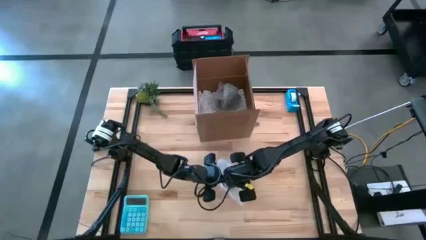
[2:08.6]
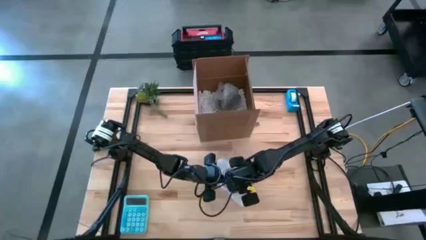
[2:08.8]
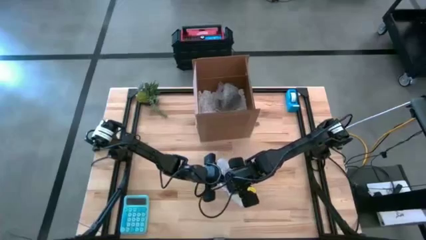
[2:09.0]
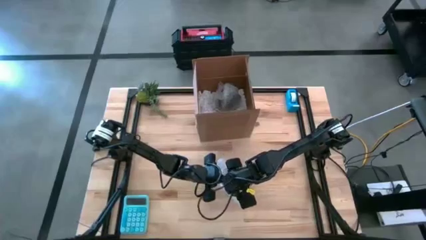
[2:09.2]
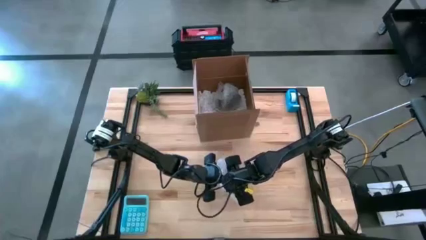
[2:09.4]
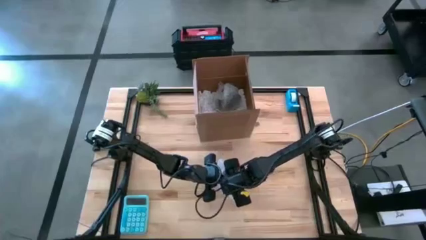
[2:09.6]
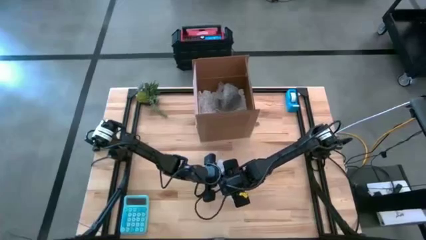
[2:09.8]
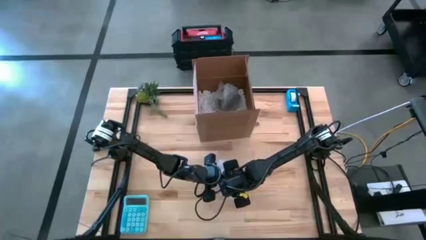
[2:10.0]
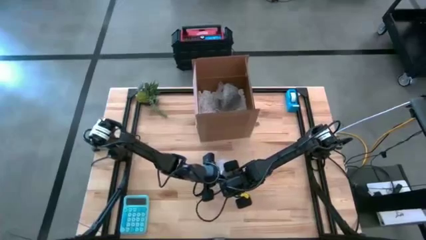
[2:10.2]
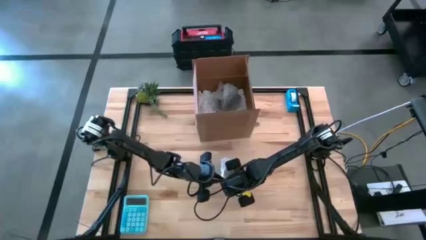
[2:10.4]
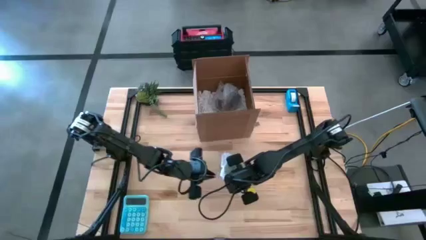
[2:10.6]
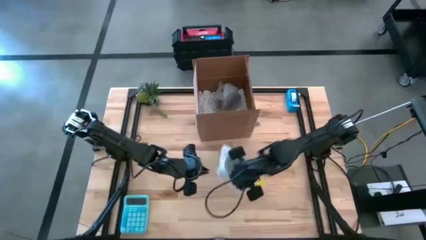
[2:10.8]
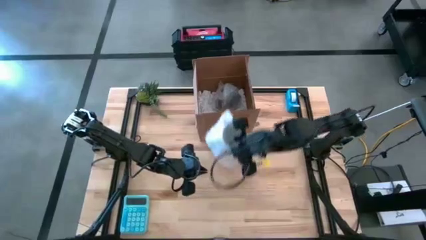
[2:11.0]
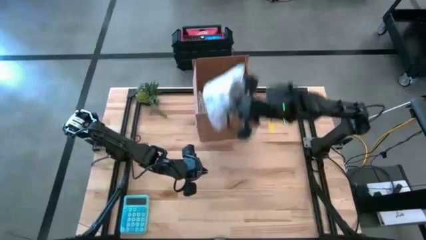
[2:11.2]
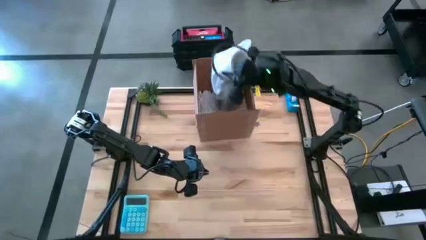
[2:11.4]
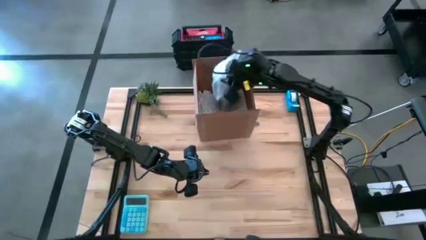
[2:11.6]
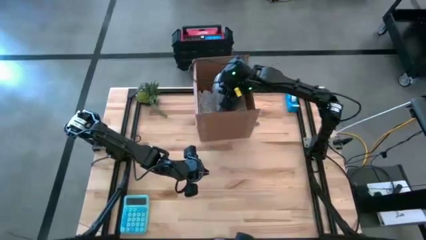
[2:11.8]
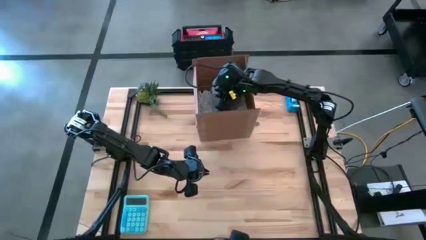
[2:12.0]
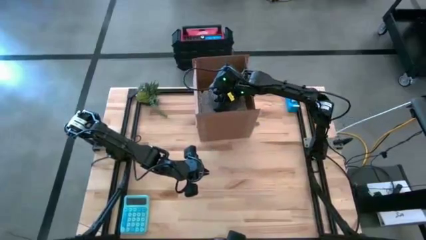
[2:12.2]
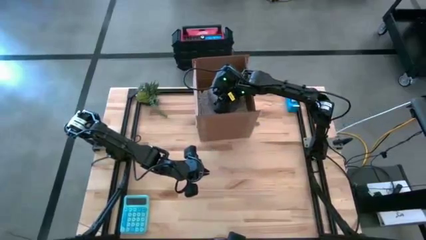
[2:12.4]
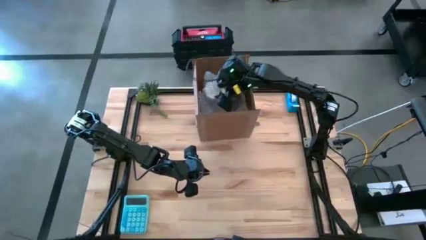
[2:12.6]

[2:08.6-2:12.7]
Task: wrap mug
Put the wrapped white mug into the cardboard box

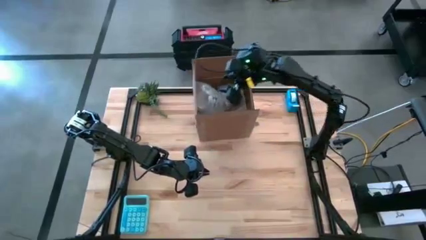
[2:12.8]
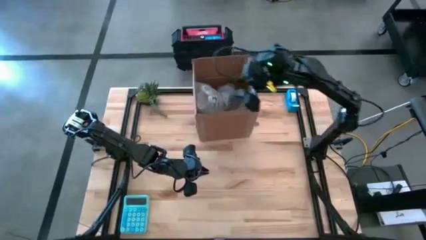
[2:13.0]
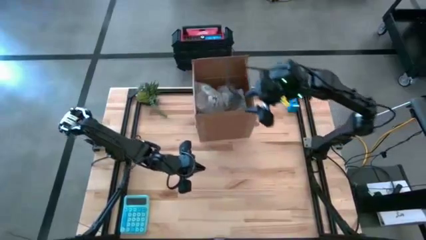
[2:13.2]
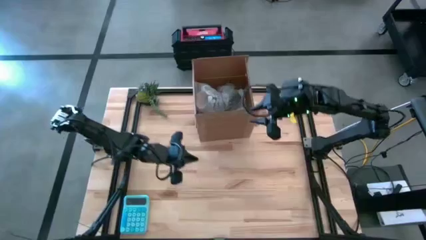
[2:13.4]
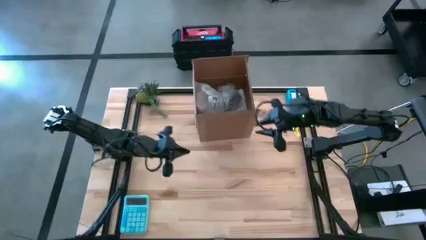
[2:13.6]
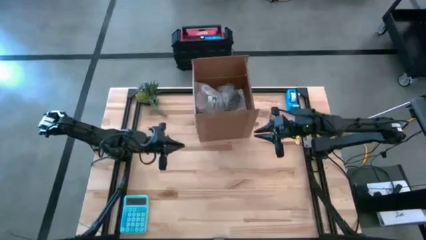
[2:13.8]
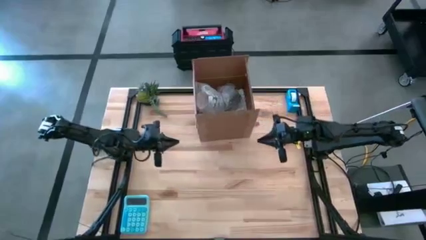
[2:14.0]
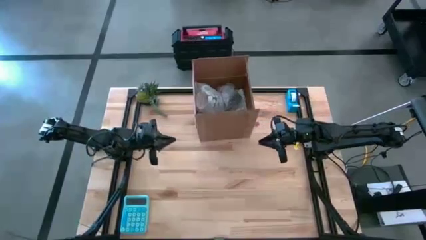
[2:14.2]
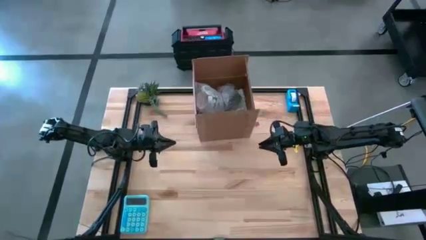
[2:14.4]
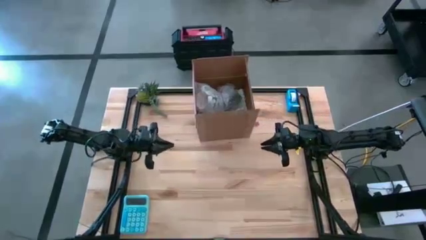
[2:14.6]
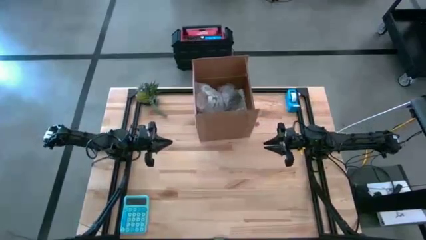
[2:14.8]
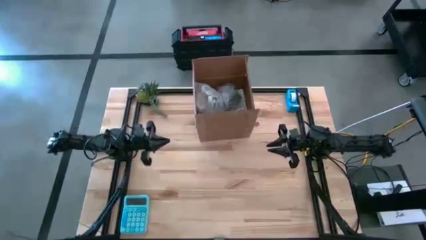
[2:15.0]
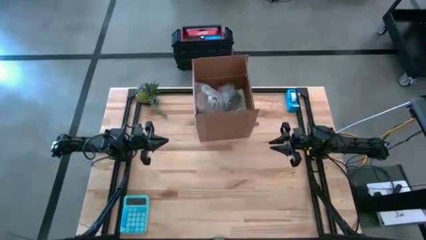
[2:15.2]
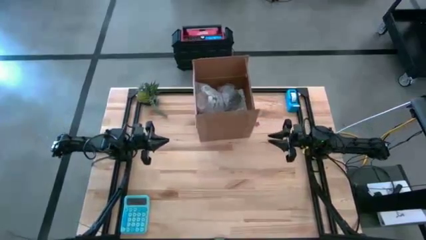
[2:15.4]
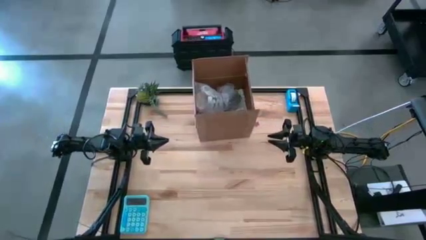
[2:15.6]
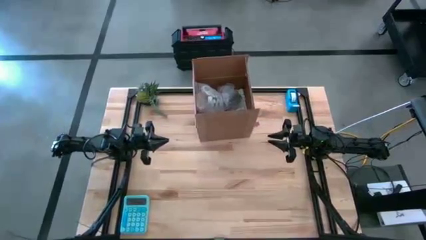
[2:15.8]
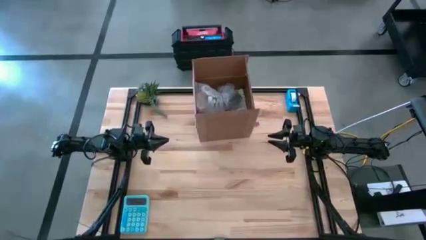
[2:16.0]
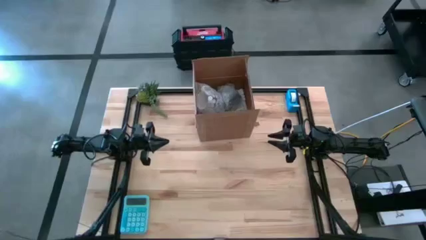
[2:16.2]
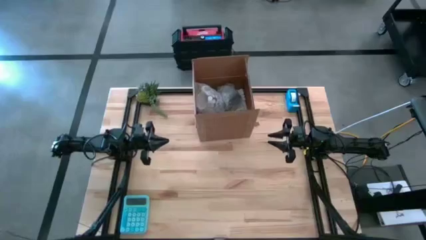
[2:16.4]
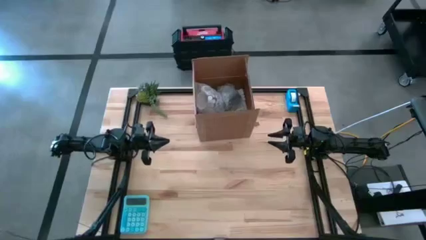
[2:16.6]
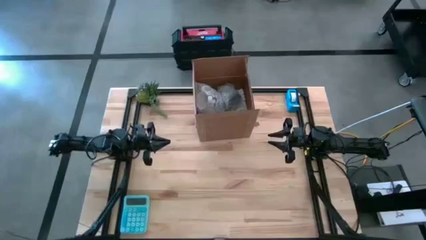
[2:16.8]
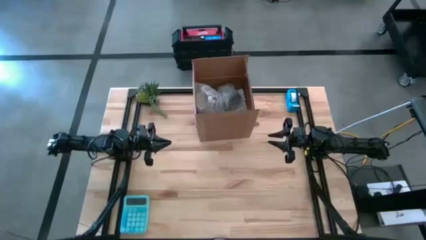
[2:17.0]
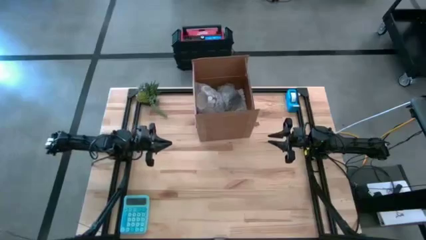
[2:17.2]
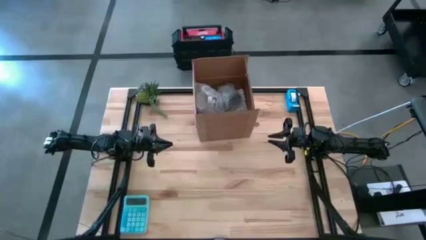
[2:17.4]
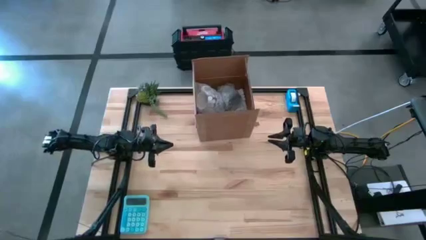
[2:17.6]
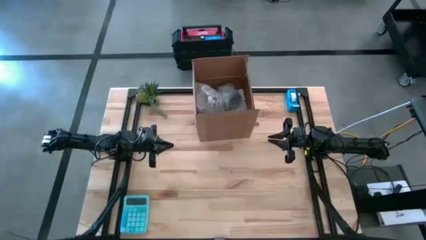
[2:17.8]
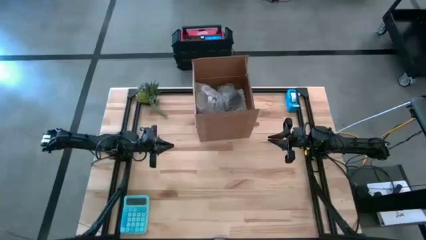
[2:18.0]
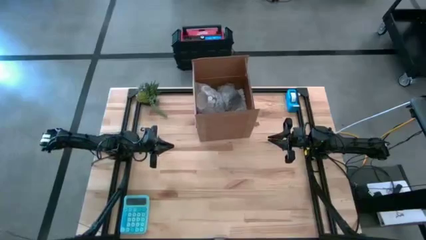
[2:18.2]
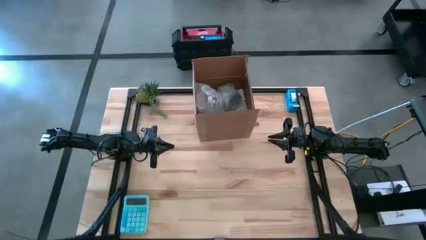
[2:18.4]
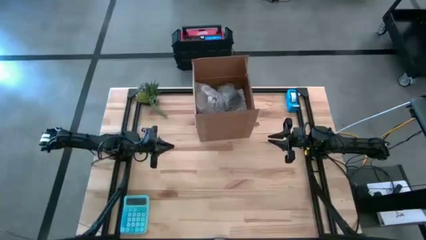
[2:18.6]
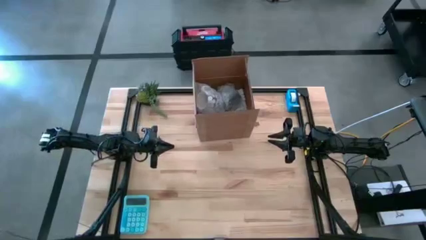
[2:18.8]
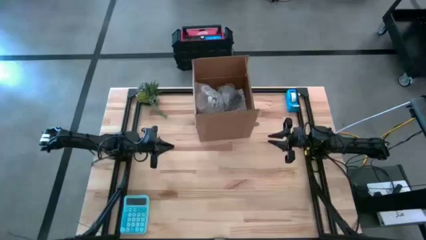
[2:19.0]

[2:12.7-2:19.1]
Return to Home Position

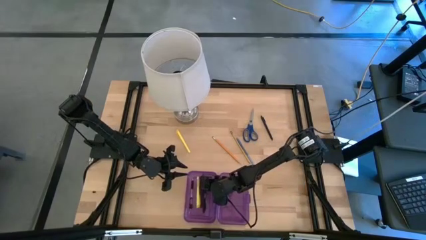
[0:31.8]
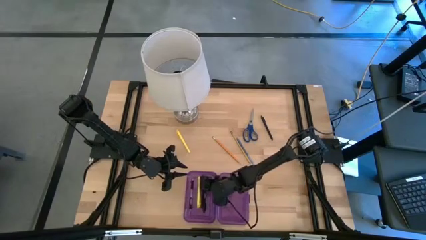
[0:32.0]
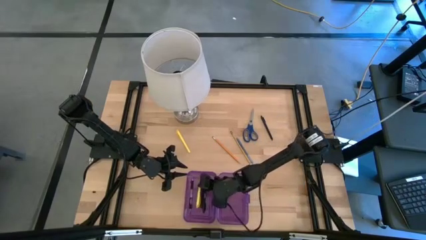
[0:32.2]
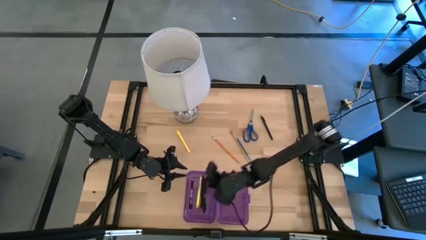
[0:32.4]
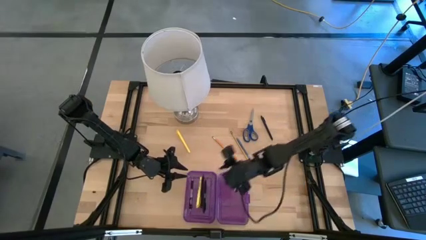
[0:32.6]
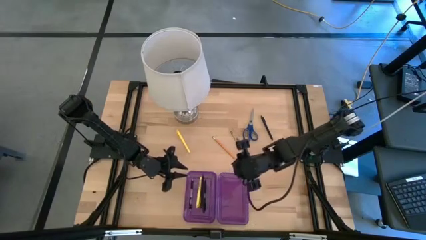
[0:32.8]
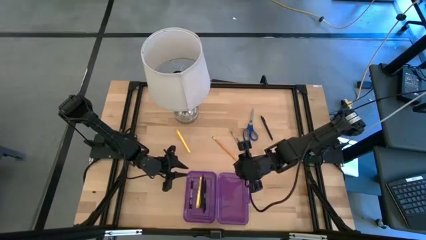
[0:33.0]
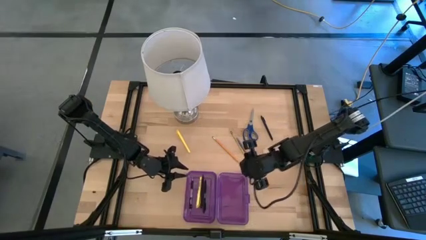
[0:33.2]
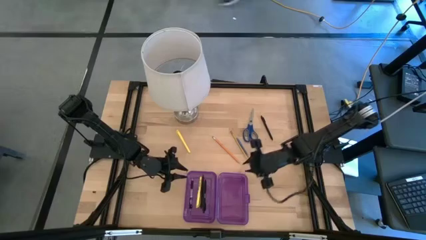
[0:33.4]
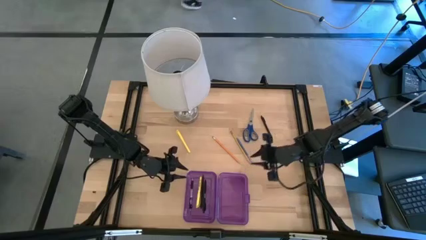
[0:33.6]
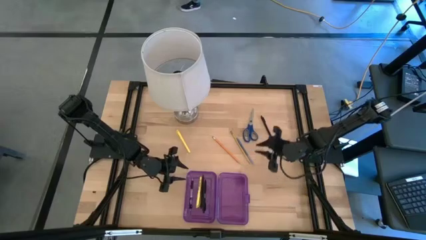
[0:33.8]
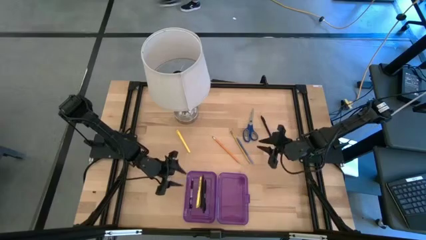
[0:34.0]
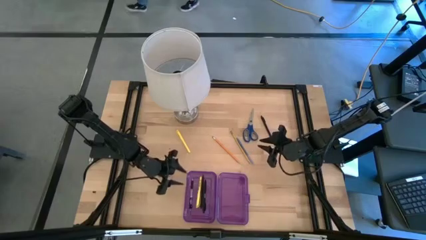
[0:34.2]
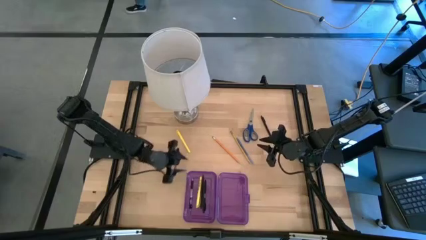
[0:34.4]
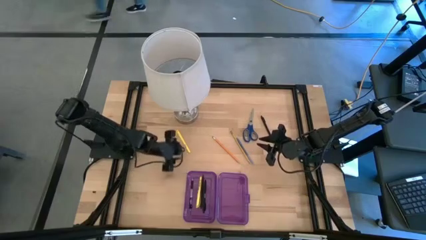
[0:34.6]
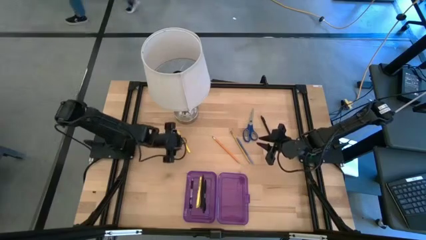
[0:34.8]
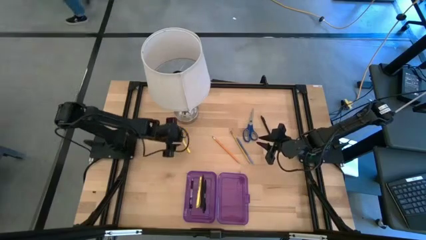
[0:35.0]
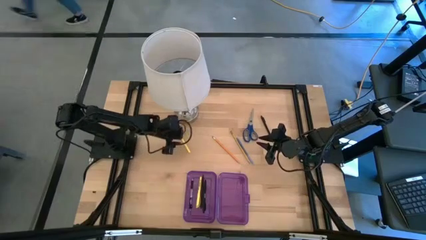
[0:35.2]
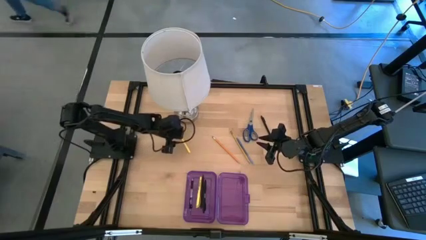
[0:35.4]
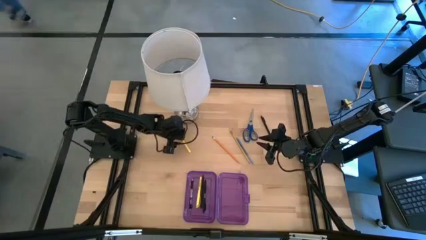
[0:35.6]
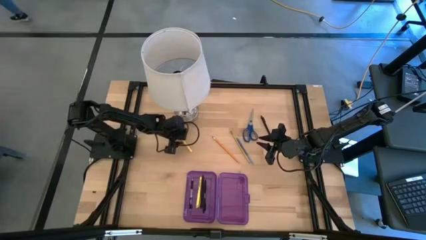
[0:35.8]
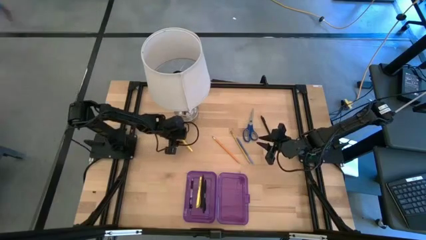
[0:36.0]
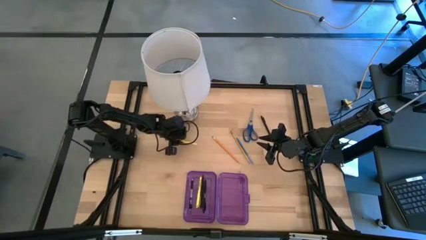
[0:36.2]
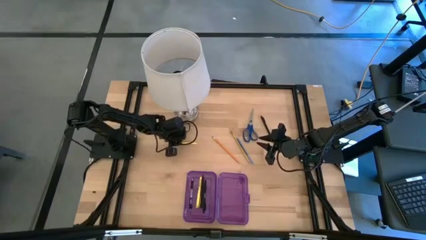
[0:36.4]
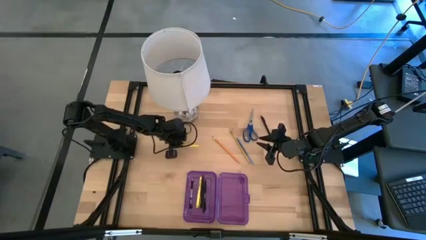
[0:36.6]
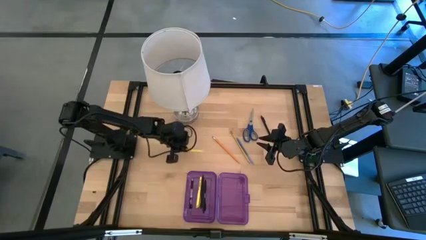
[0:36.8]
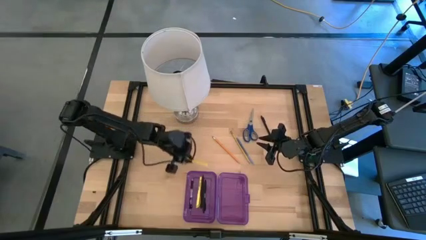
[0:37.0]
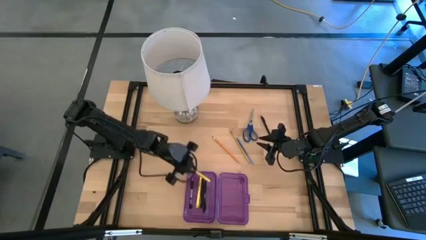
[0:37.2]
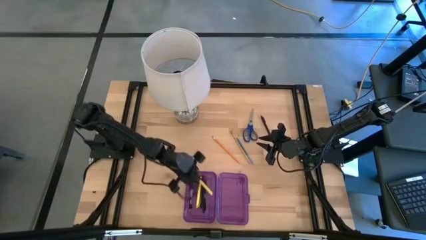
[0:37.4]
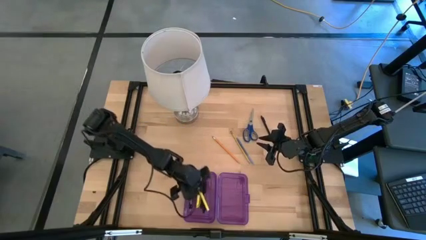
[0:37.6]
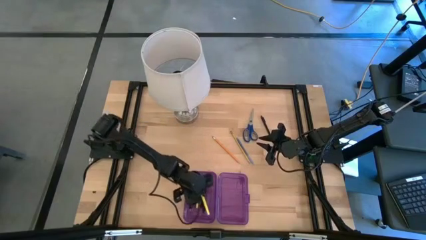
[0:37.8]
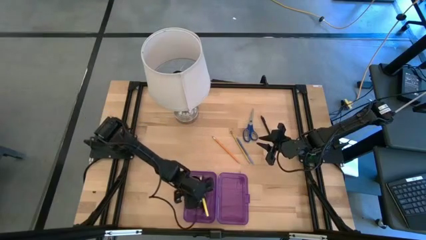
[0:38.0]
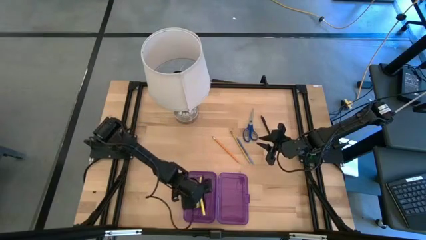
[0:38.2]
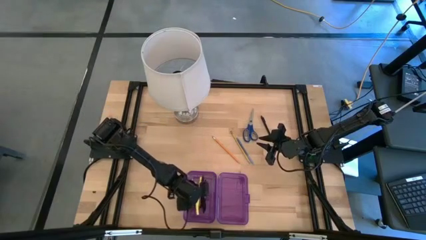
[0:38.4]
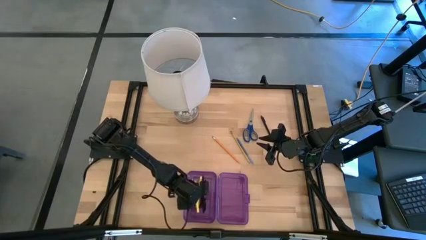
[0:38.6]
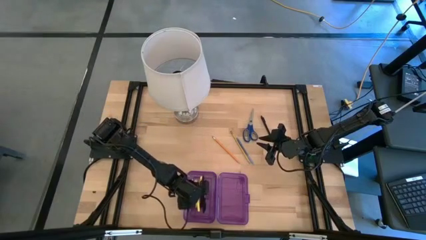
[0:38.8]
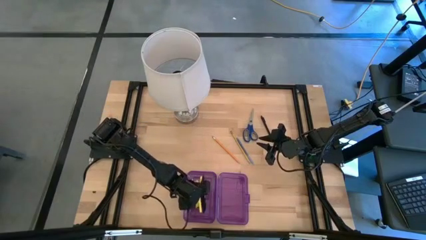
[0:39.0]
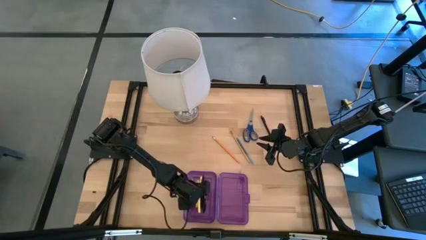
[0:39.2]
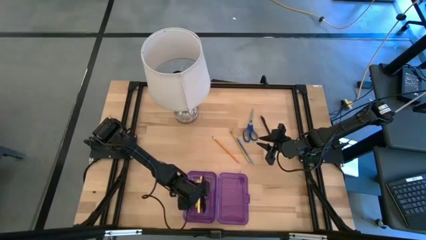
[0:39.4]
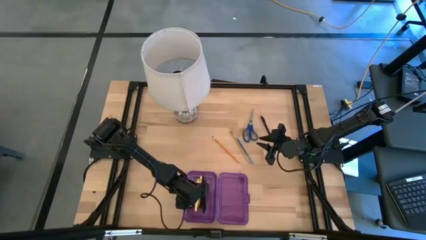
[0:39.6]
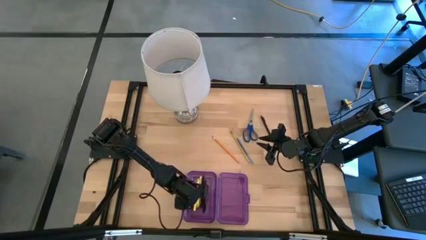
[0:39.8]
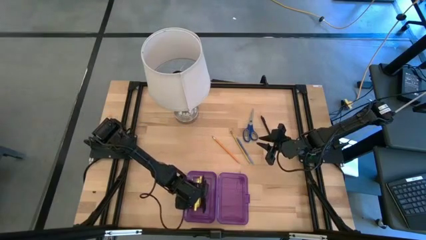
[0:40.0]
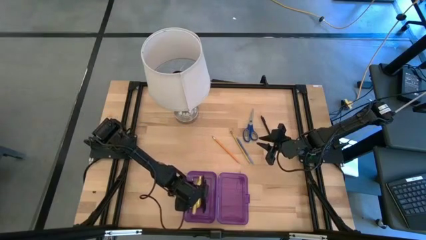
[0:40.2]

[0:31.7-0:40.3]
Task: Pick & place school supplies into a supply box
Put the yellow pen into the violet supply box
